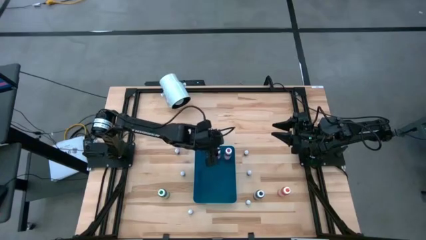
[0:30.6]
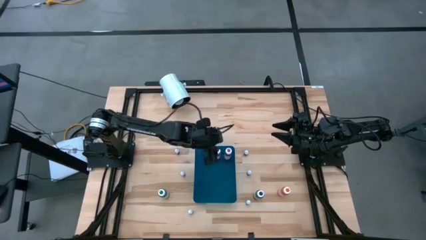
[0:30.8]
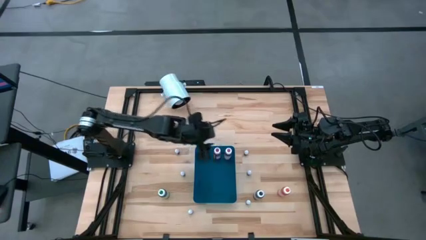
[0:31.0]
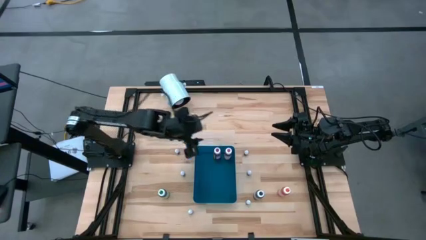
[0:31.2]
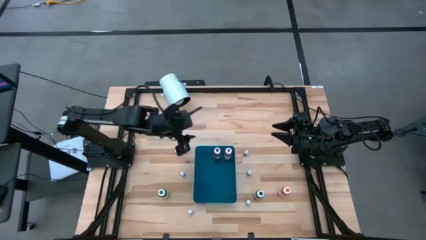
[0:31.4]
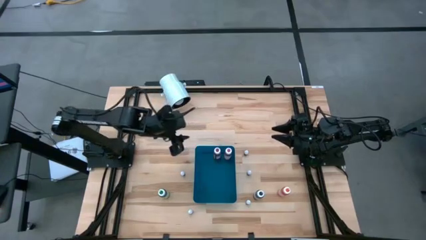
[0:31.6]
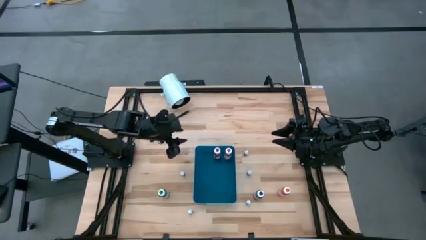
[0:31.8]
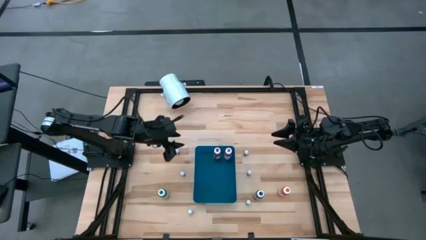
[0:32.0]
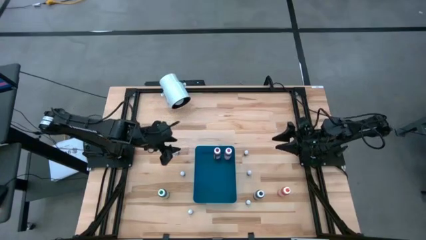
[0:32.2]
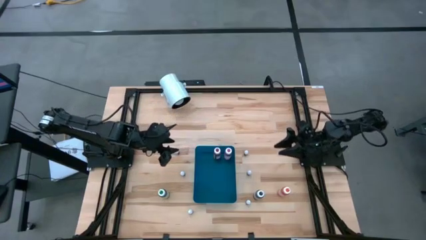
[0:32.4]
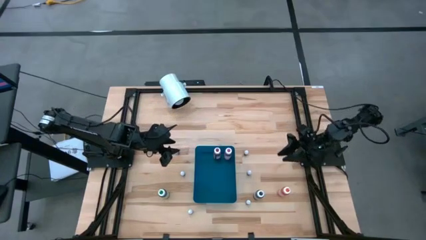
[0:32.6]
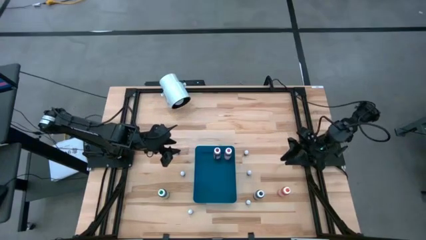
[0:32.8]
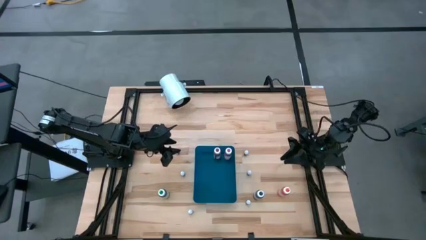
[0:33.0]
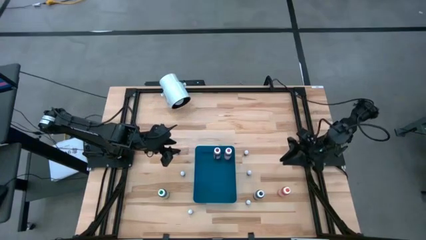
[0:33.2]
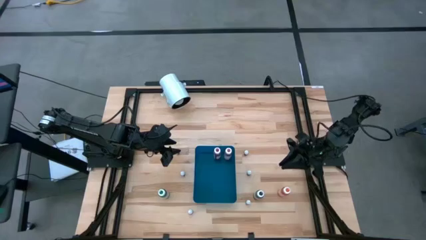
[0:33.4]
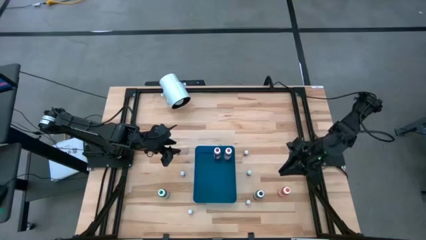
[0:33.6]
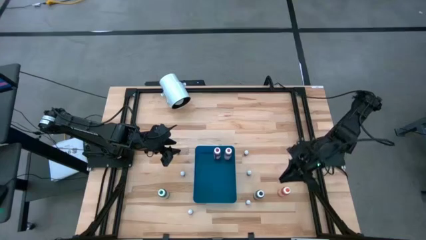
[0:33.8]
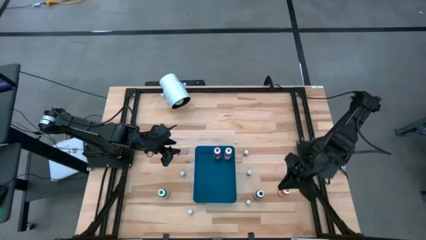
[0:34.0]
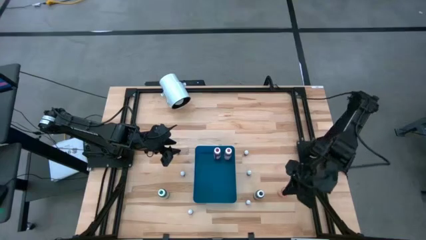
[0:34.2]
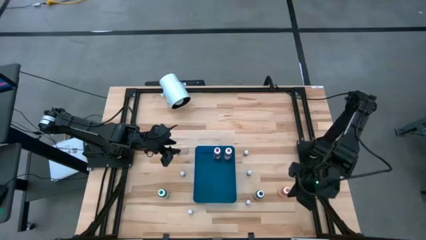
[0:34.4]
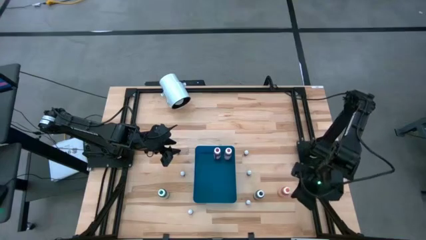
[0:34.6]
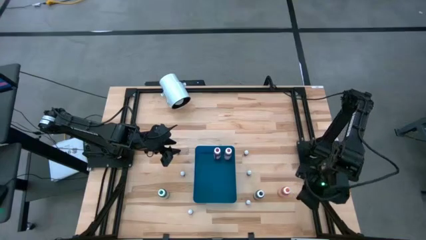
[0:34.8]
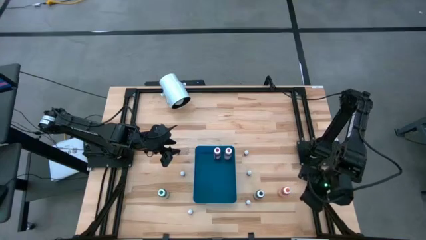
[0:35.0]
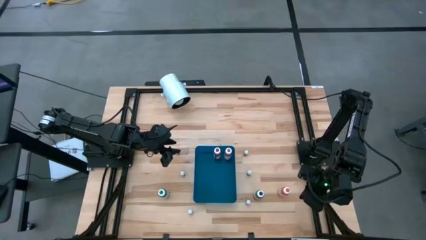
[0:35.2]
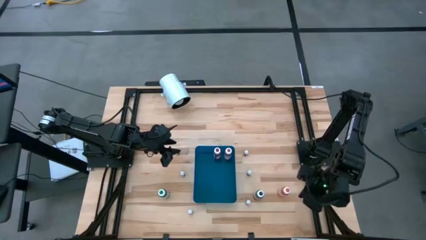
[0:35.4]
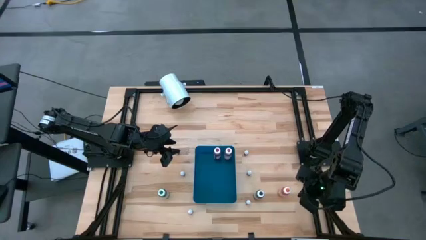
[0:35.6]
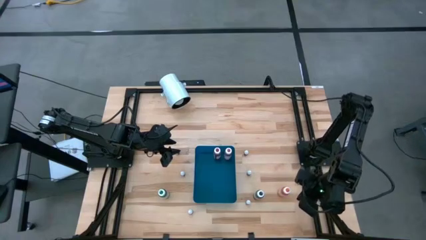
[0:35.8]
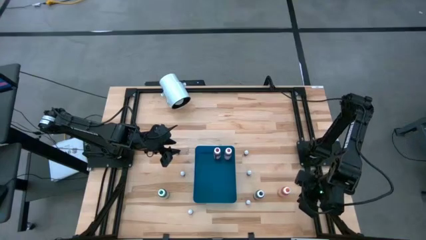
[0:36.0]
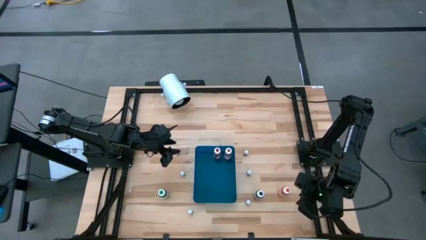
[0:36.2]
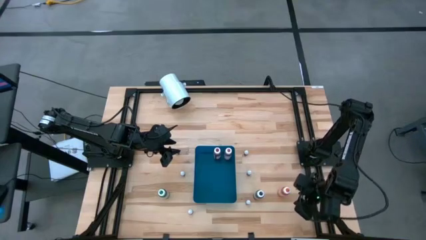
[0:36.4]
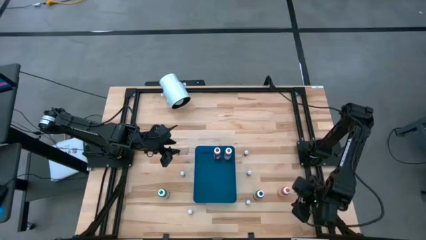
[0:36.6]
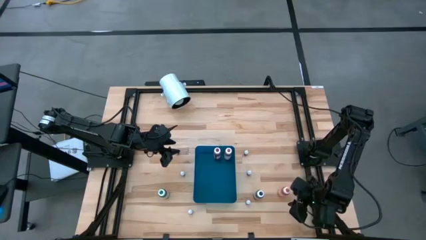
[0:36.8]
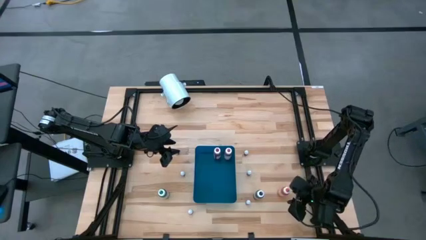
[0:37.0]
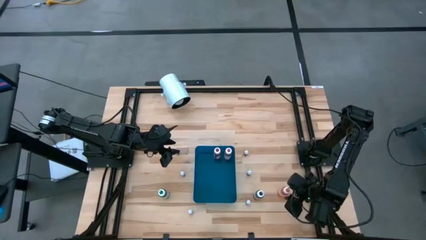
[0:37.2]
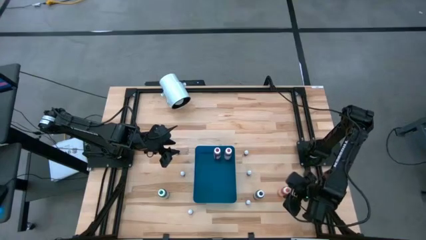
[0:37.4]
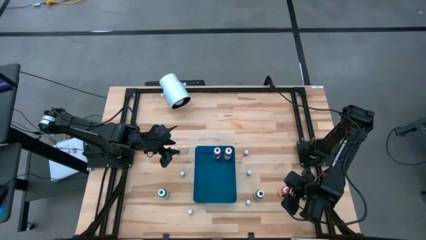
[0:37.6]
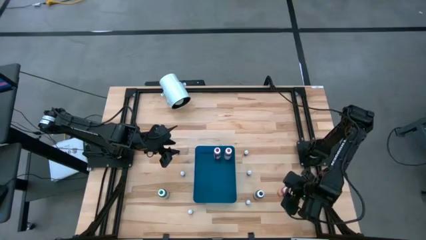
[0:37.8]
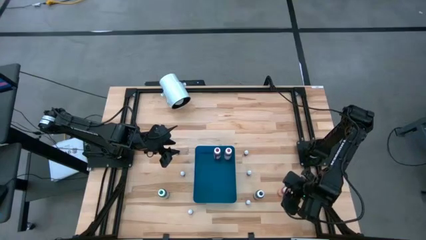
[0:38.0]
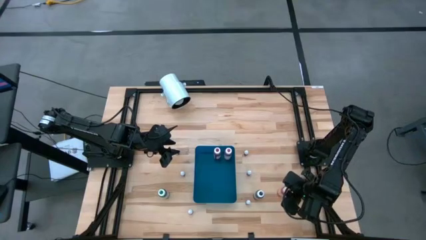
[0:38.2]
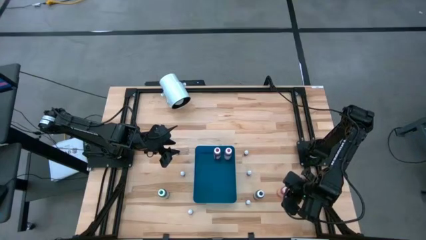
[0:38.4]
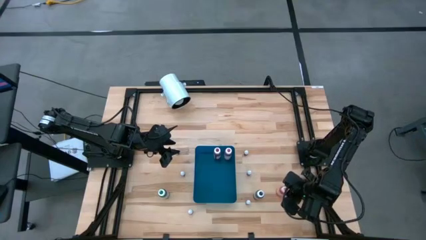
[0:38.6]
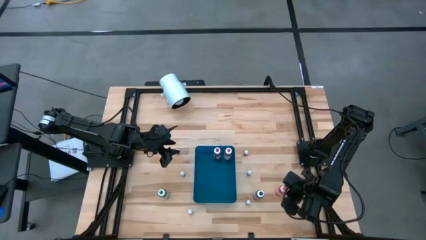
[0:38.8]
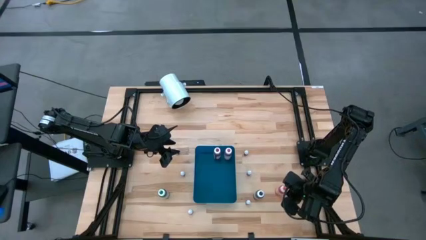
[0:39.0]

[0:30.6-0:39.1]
Task: Pick & Place food coloring
Put the big orange food coloring bottle into the blue container

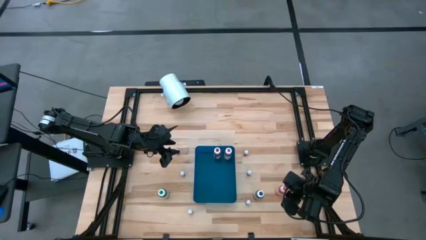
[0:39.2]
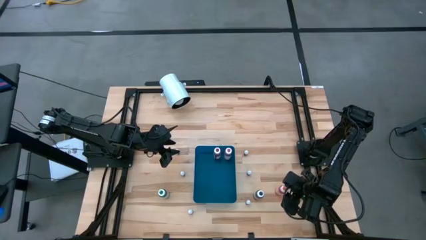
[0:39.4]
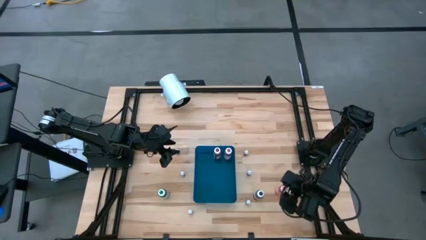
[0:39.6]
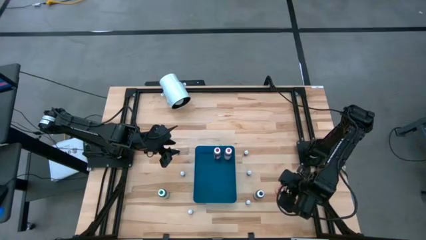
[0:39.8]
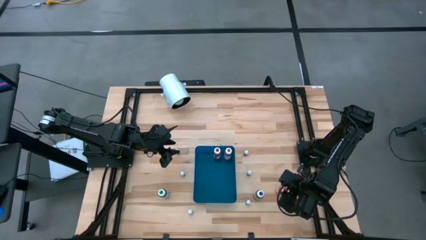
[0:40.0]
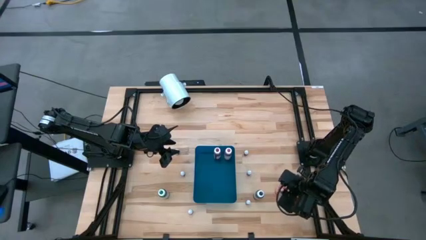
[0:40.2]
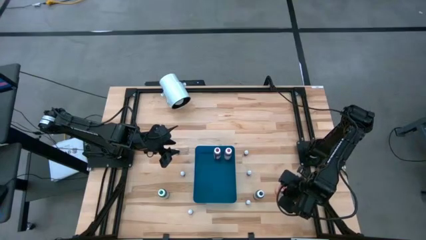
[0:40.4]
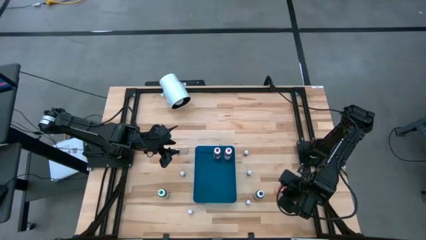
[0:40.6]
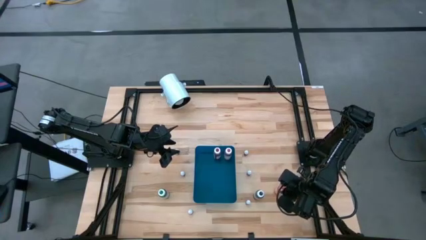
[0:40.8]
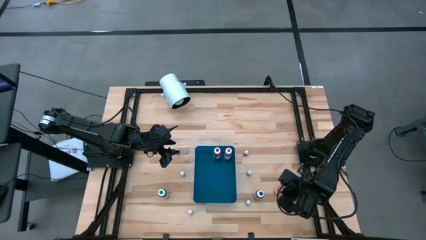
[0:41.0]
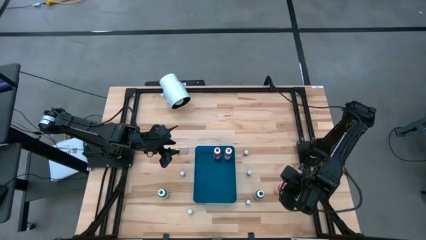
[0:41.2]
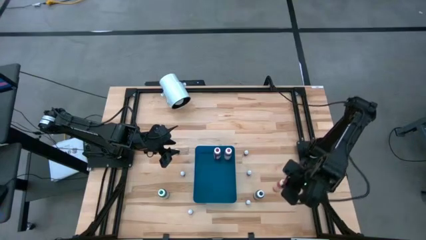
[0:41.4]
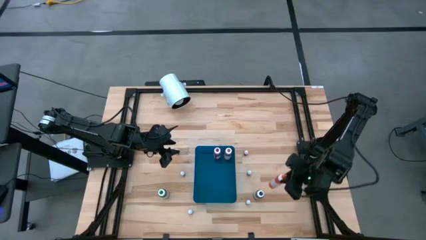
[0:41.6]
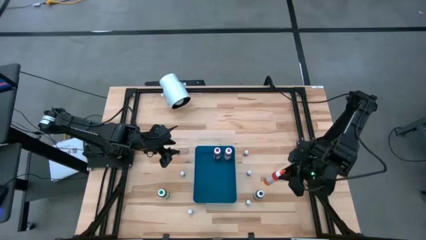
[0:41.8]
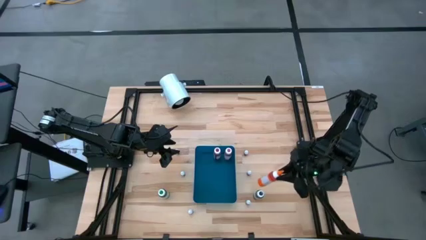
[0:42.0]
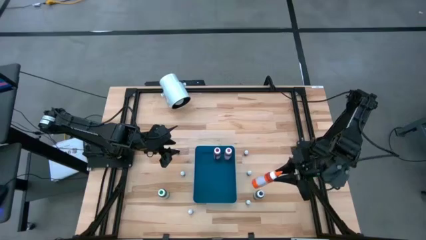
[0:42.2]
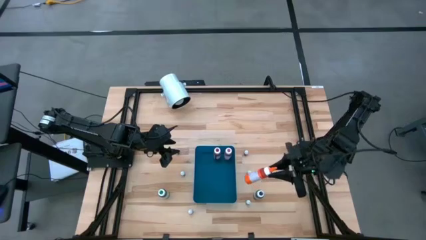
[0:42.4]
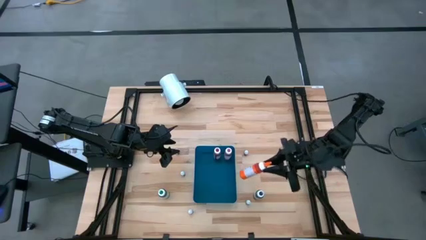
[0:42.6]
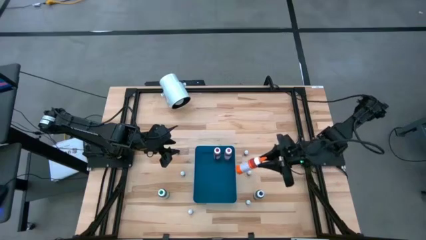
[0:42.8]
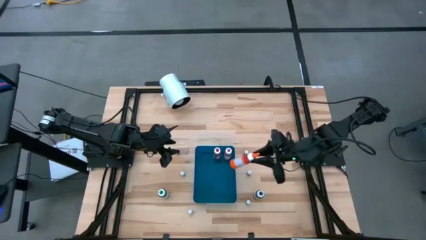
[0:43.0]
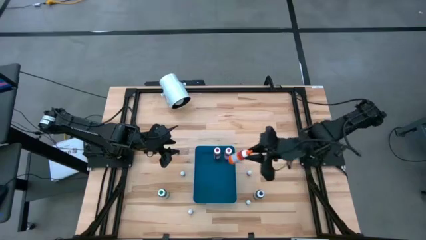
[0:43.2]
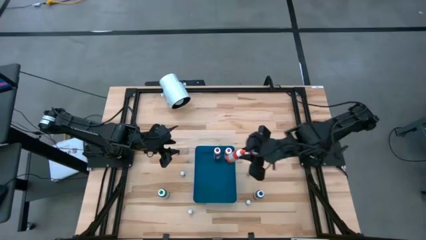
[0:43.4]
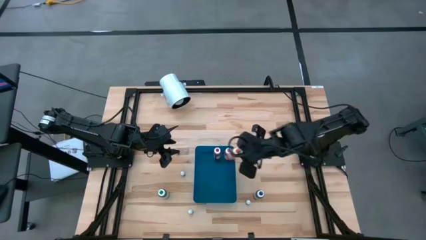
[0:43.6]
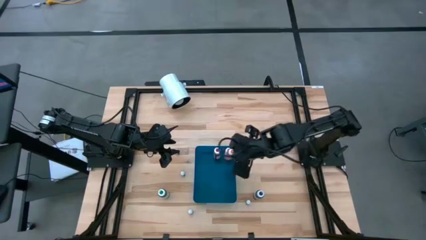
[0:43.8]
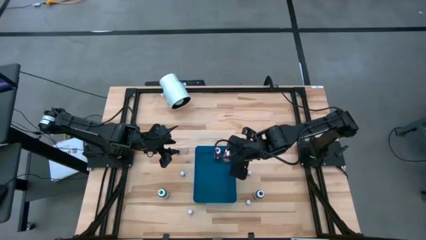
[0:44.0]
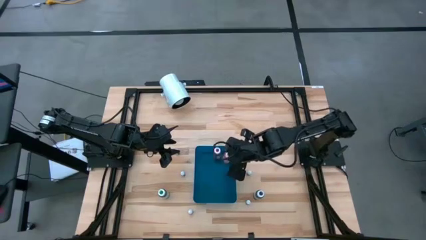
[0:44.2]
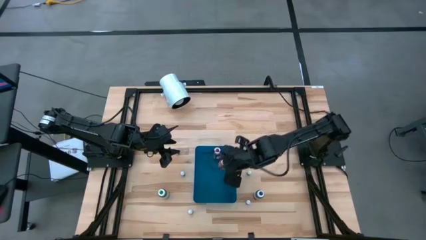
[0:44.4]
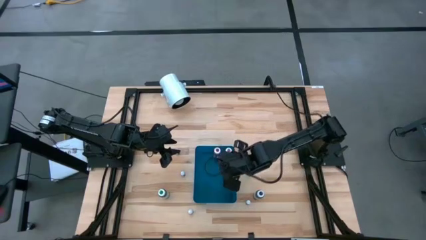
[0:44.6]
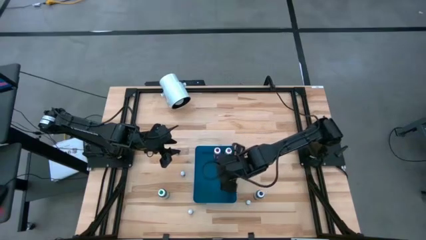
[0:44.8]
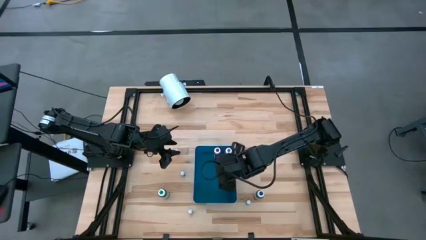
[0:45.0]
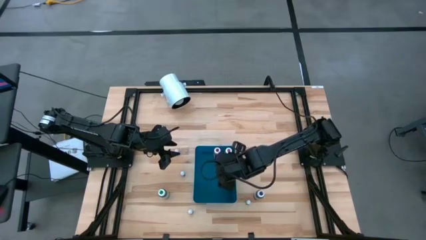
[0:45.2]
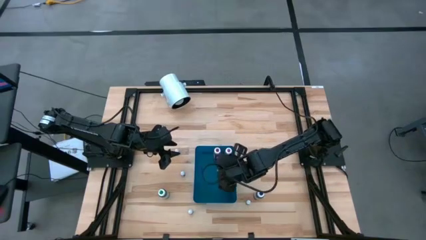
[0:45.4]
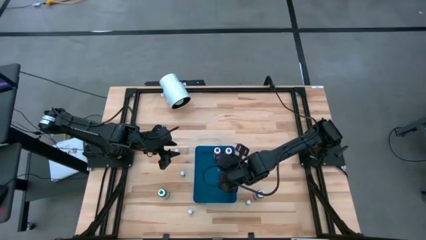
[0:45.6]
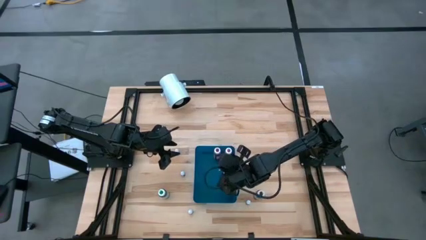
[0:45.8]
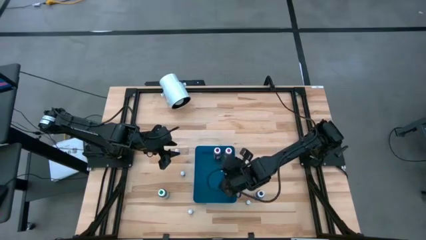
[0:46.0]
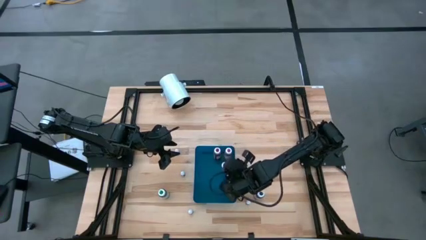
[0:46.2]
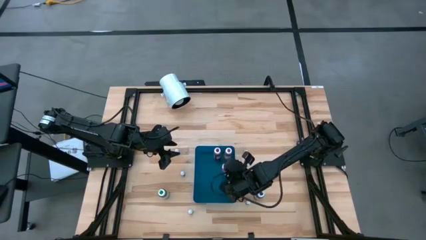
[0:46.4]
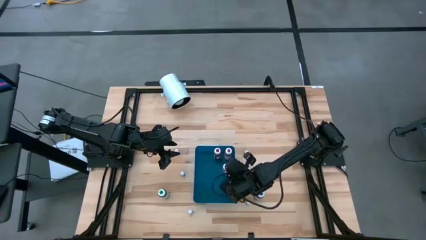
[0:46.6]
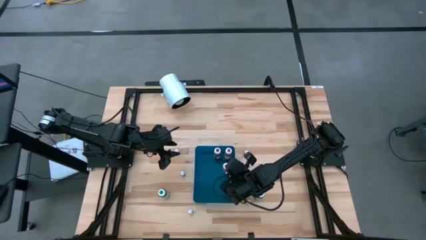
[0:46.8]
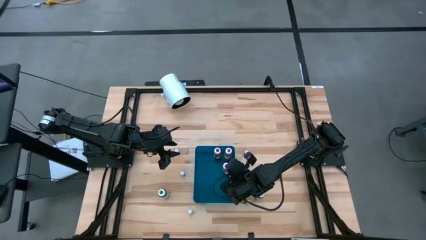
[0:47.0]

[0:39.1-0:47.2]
Put the big orange food coloring bottle into the blue container
